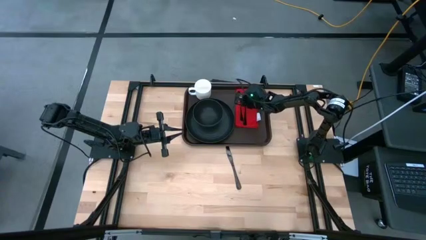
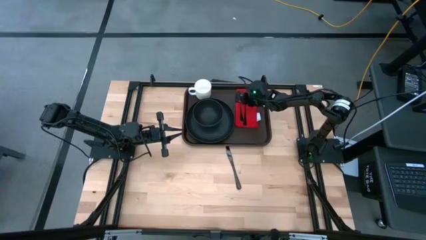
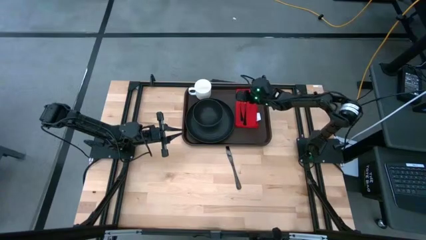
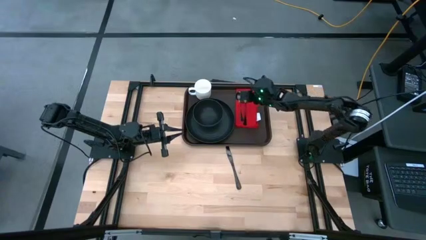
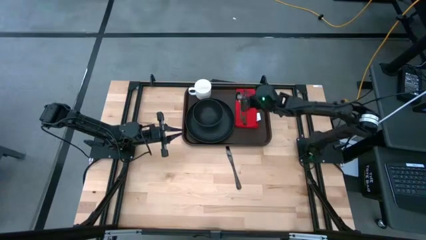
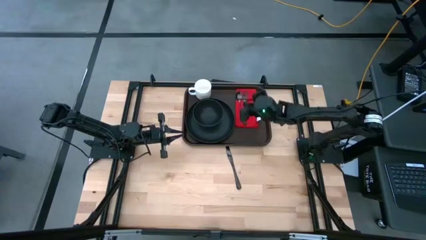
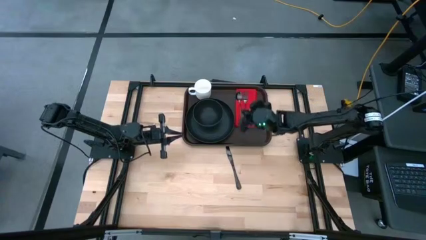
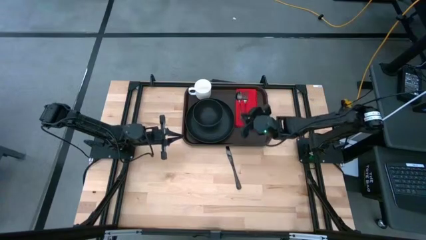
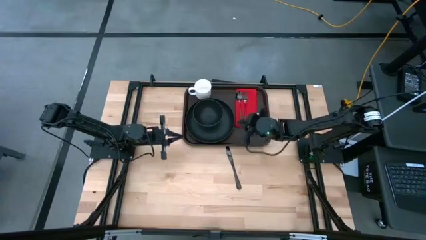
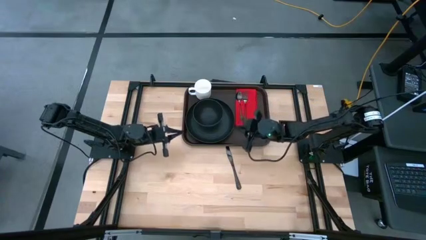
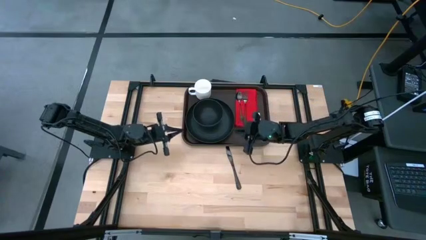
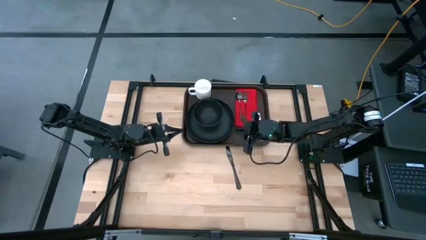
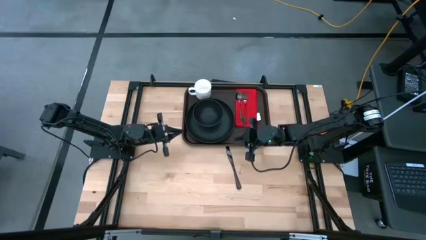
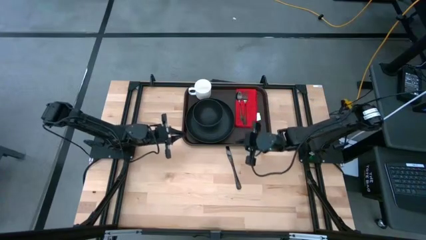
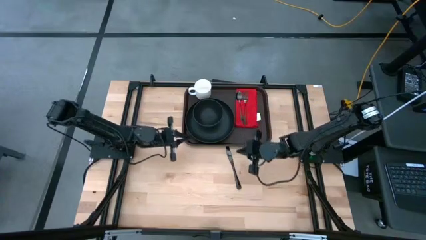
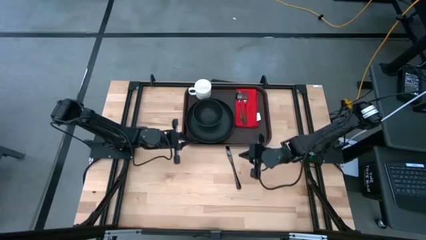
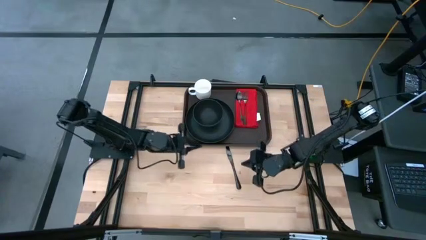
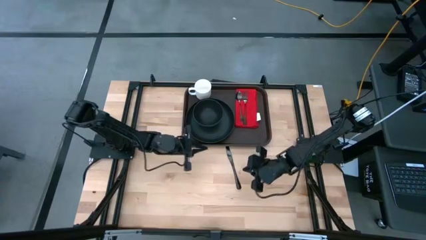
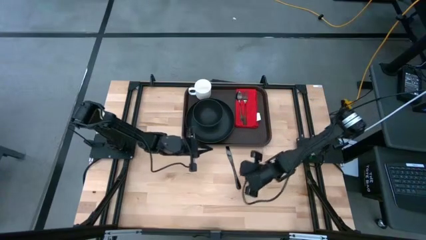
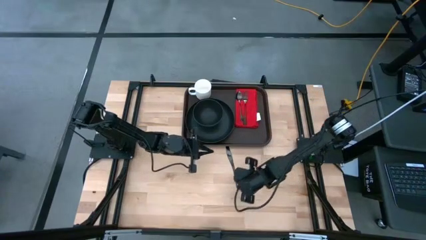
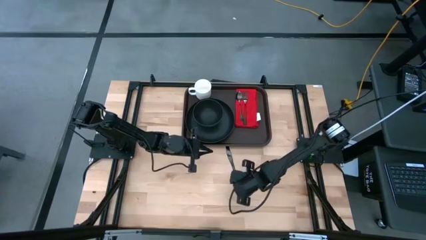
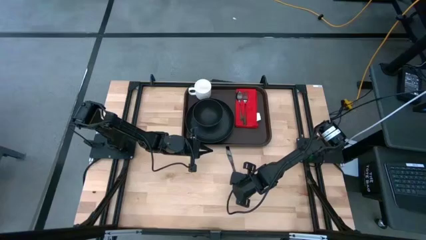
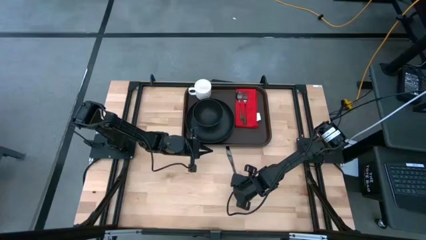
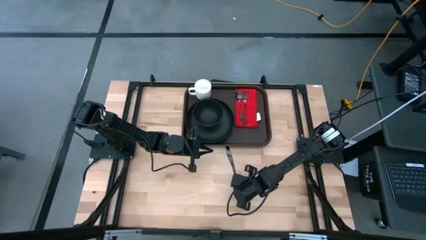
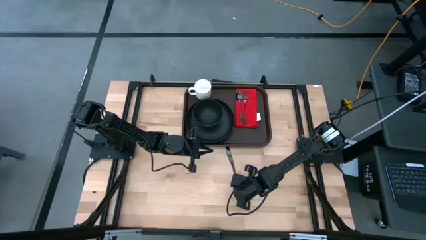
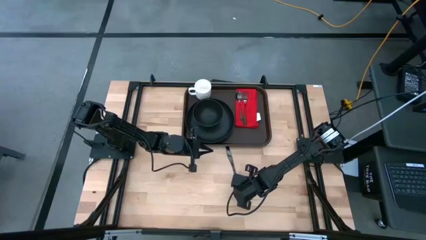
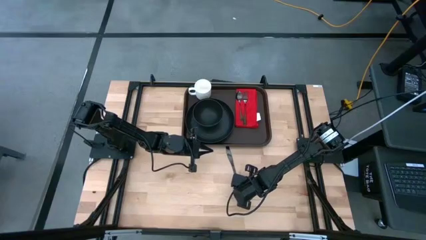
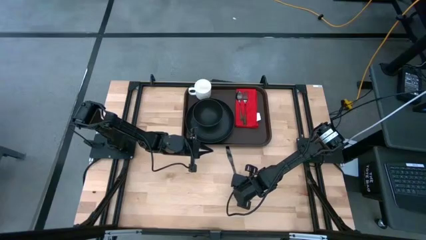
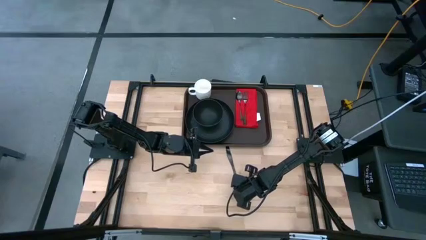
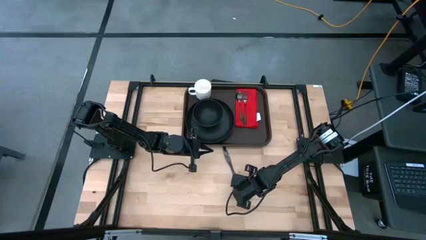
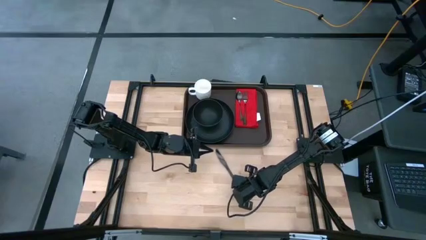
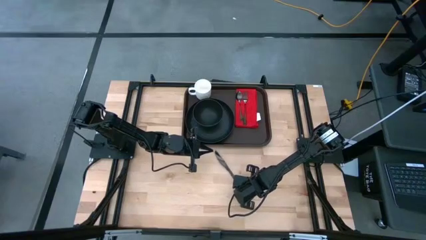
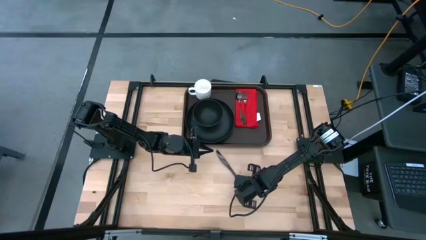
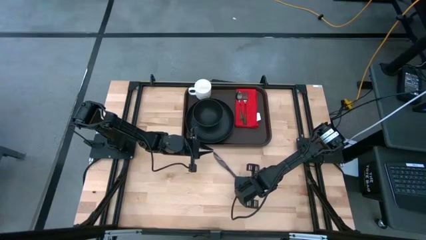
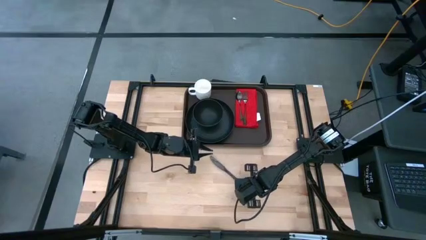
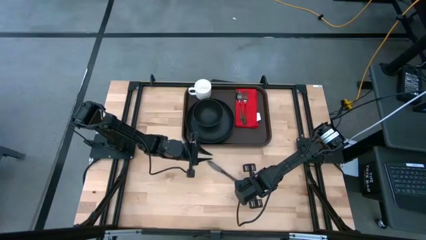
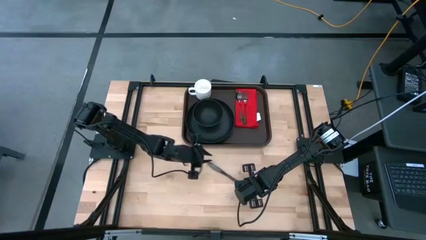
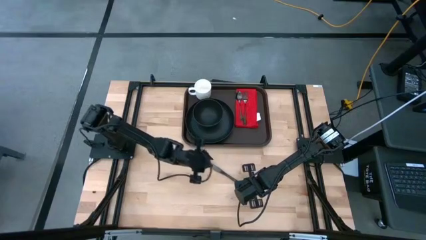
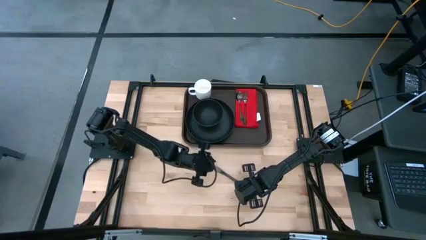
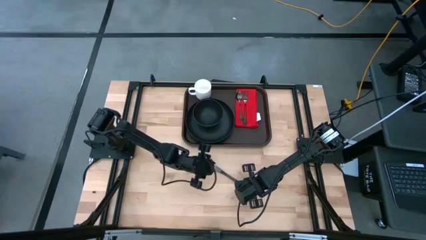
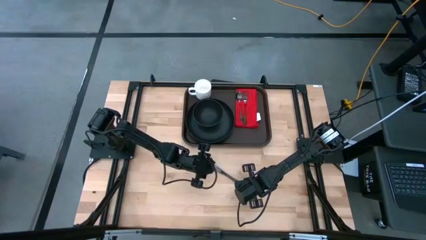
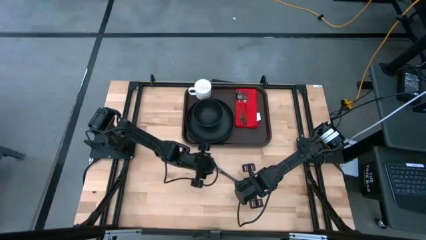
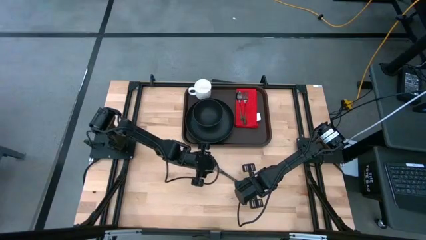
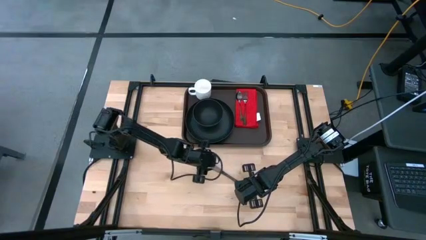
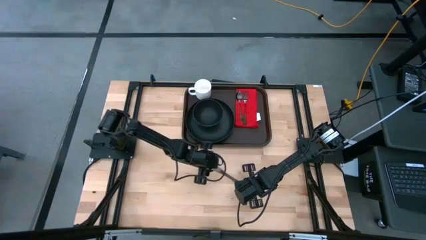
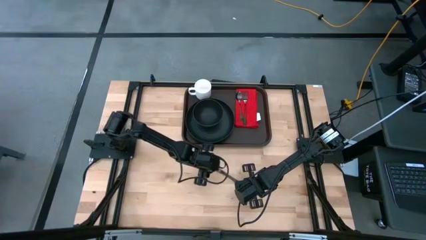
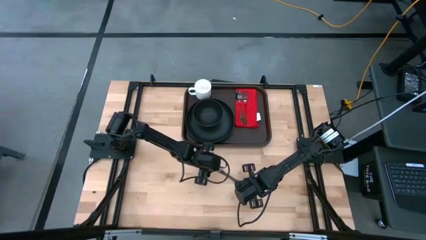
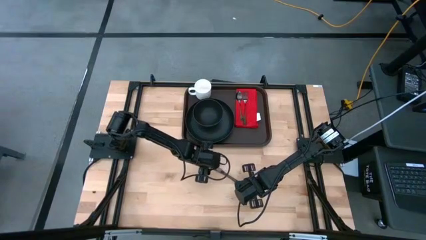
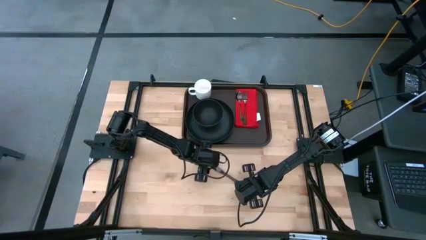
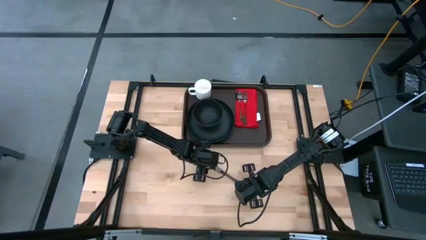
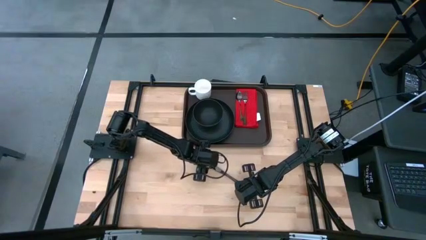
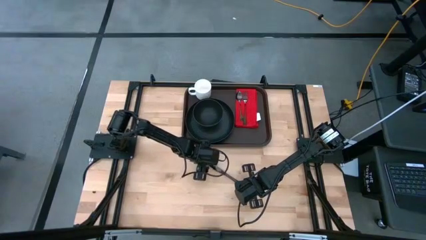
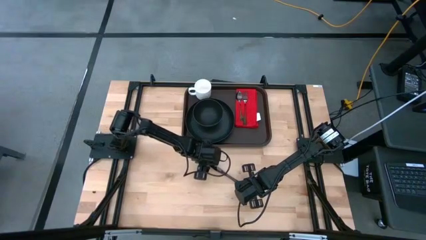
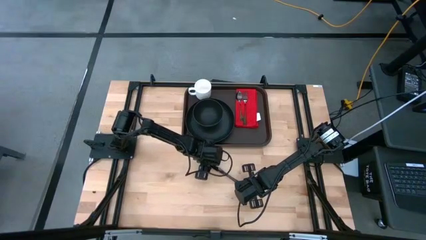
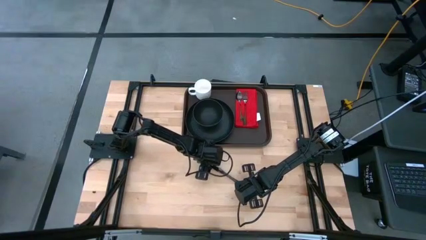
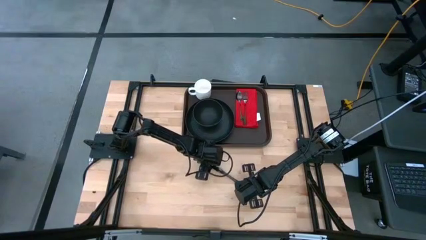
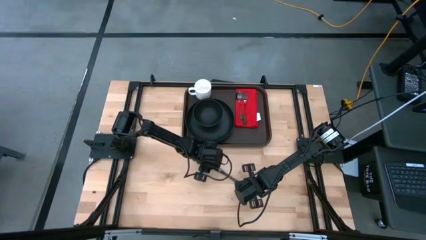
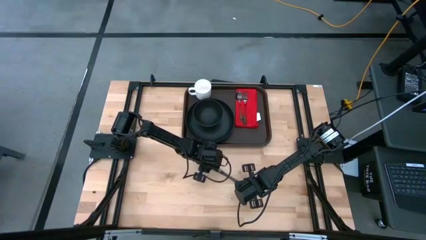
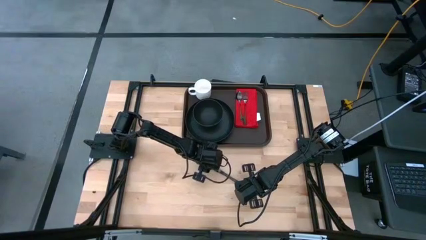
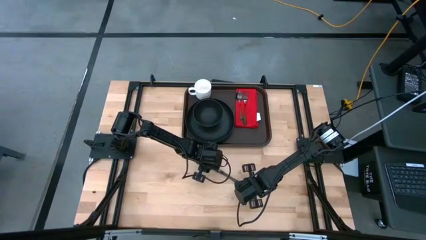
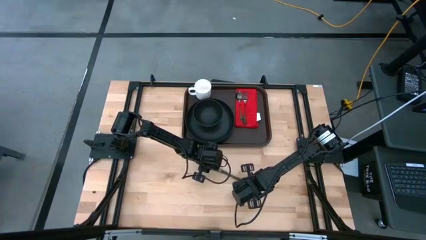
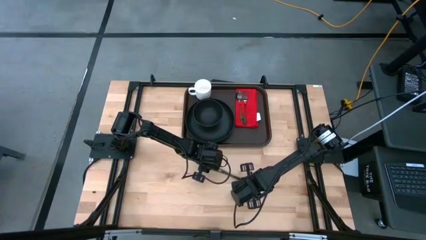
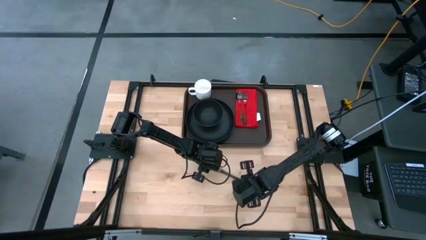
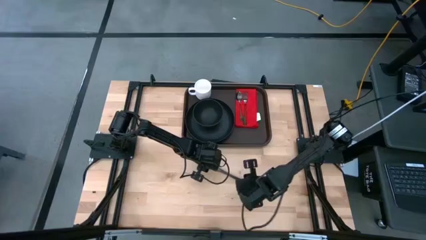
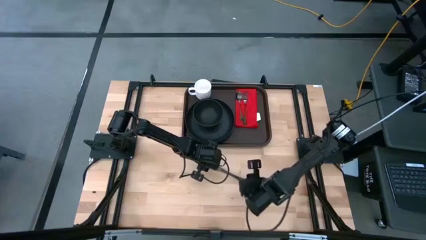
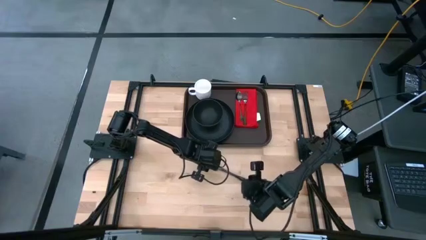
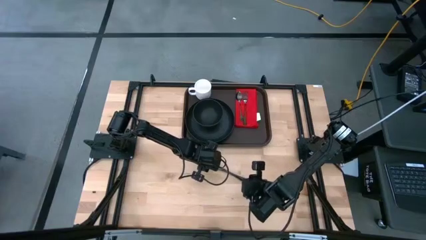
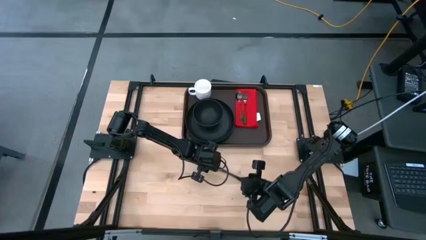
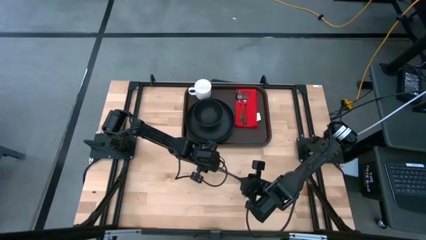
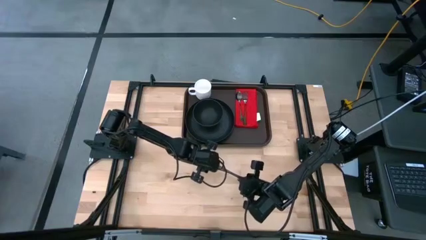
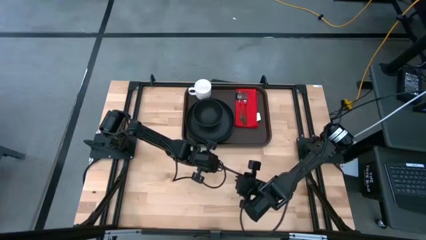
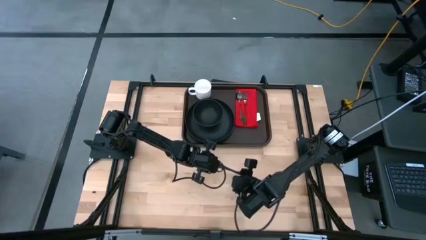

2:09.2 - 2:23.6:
Task: Set up tray
Put the black table knife on the red table napkin to the right of the black fork
